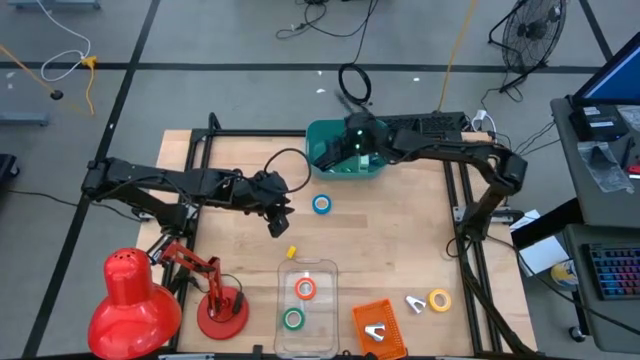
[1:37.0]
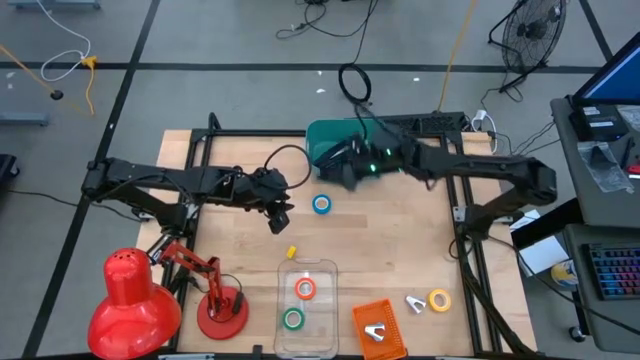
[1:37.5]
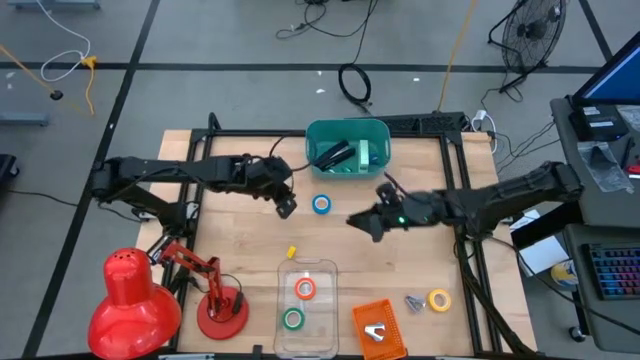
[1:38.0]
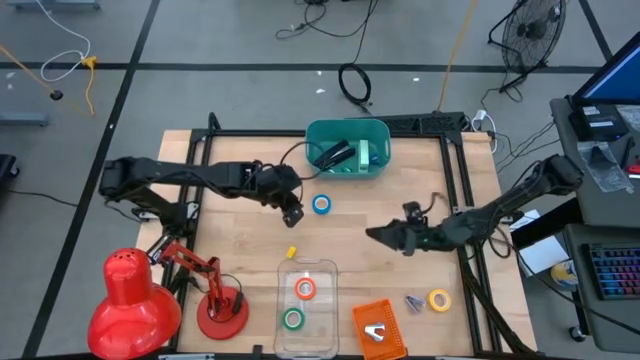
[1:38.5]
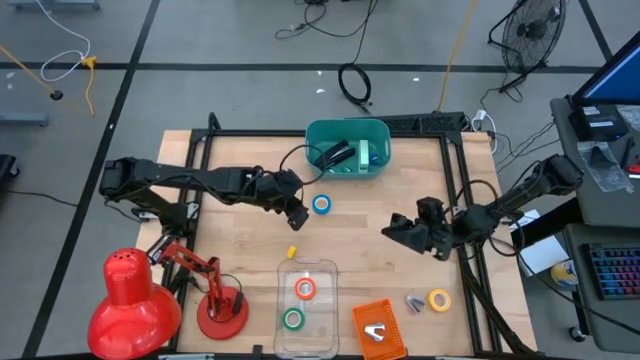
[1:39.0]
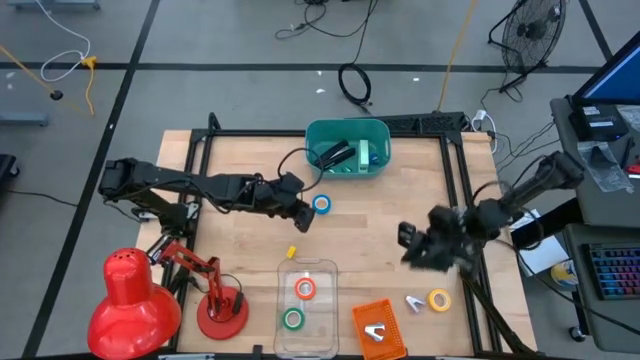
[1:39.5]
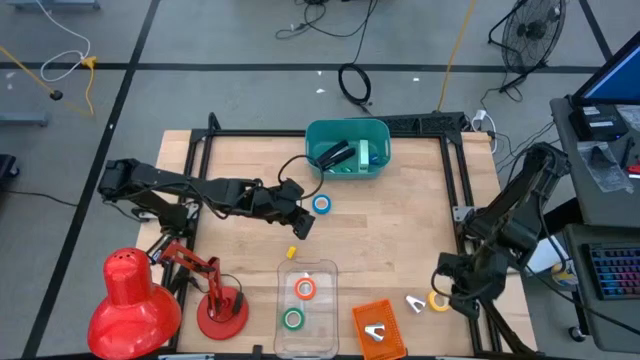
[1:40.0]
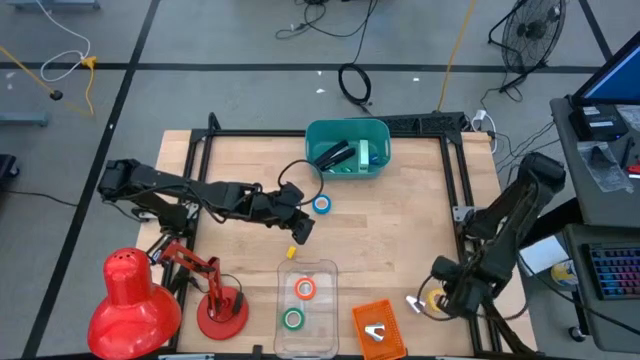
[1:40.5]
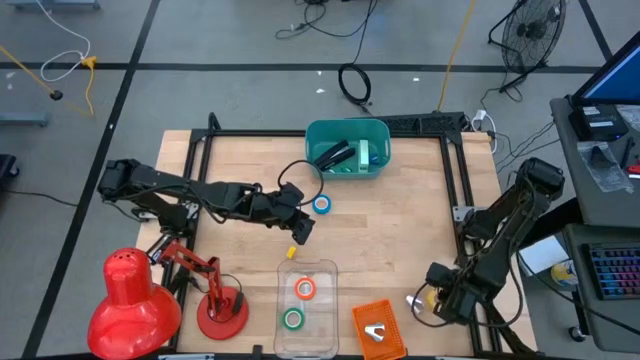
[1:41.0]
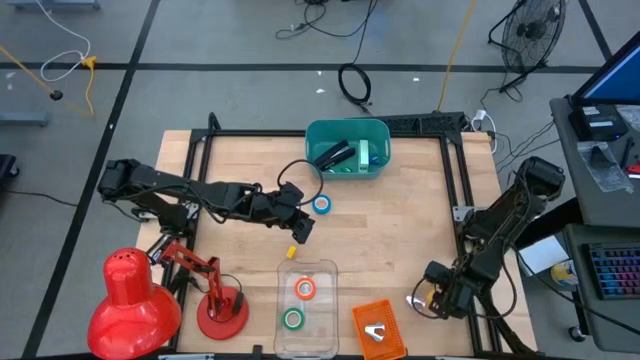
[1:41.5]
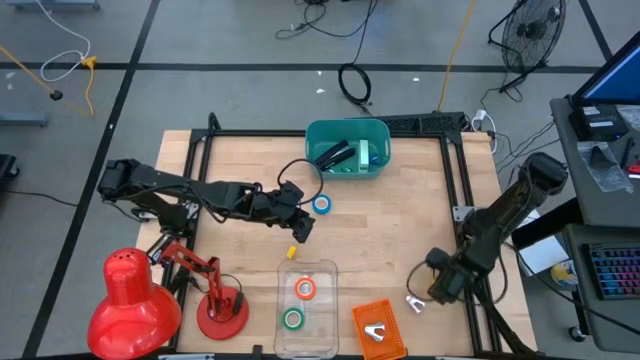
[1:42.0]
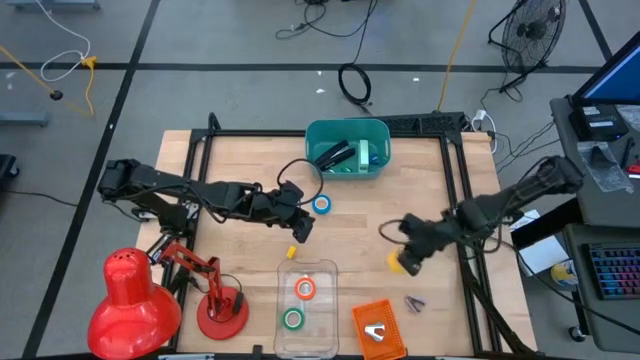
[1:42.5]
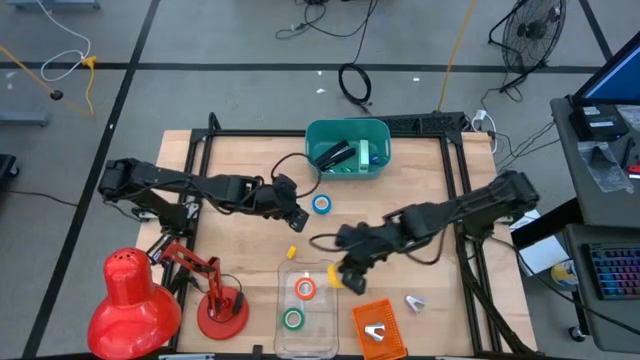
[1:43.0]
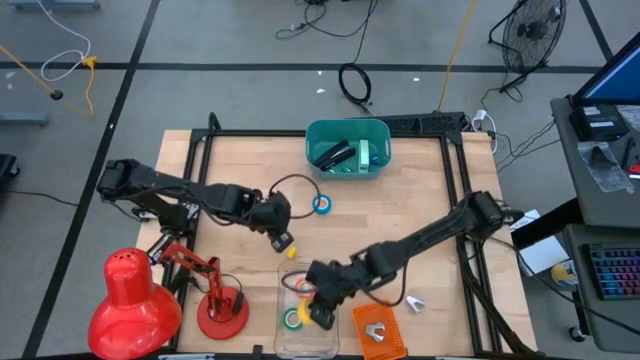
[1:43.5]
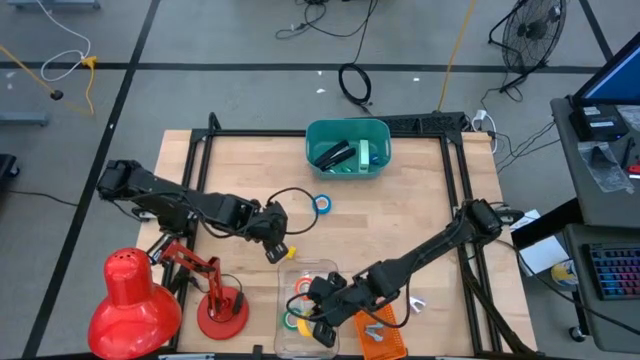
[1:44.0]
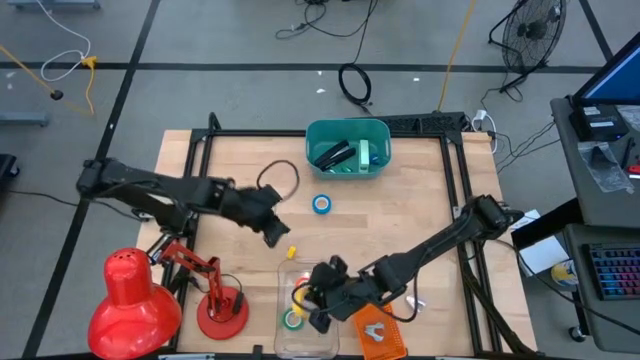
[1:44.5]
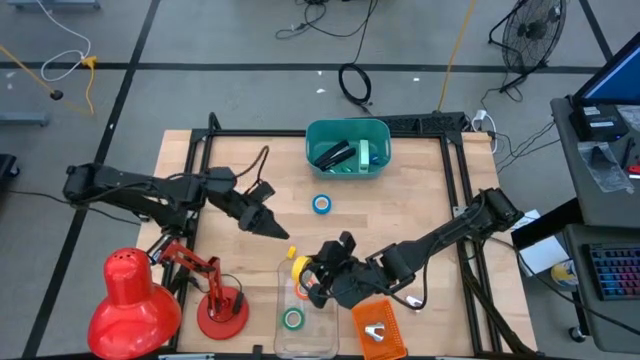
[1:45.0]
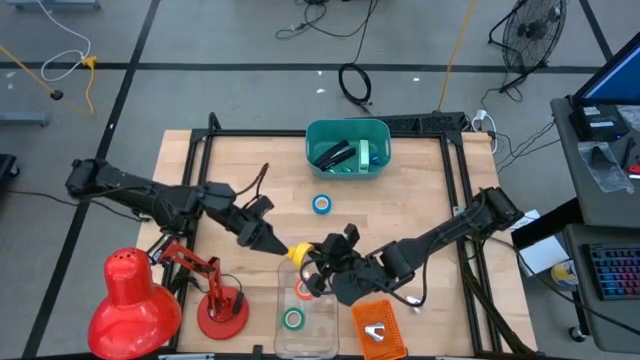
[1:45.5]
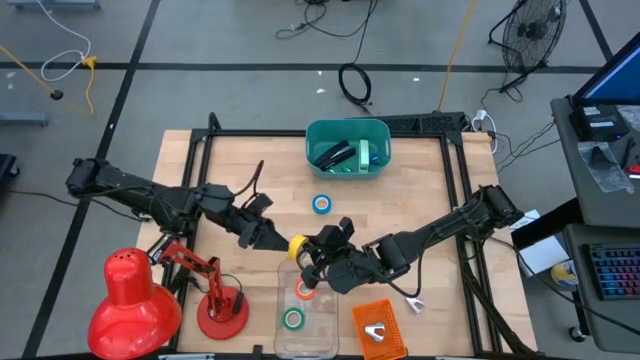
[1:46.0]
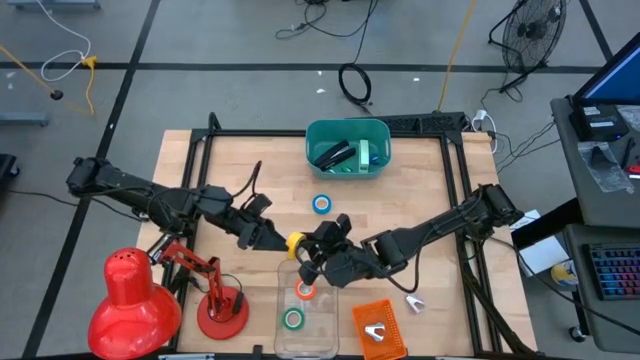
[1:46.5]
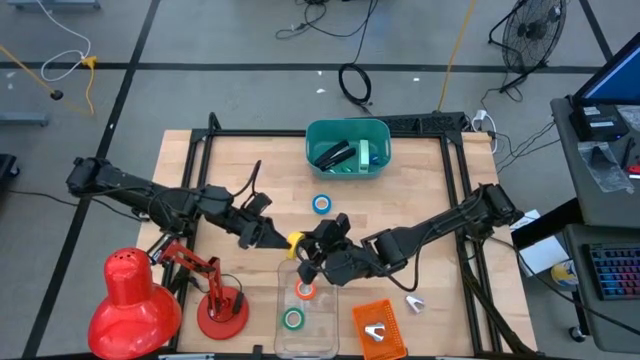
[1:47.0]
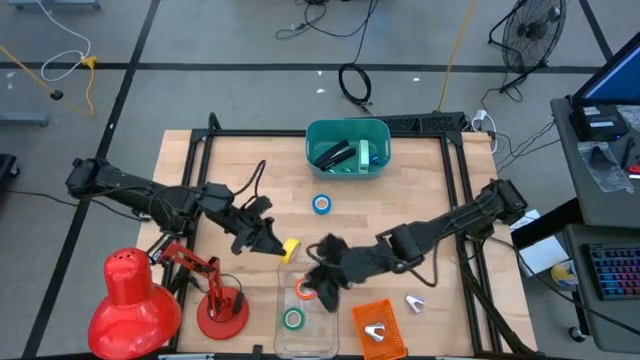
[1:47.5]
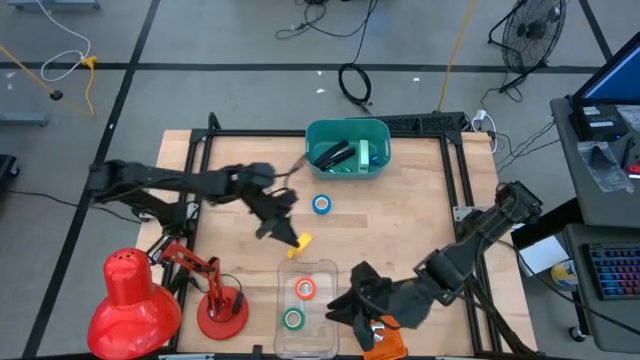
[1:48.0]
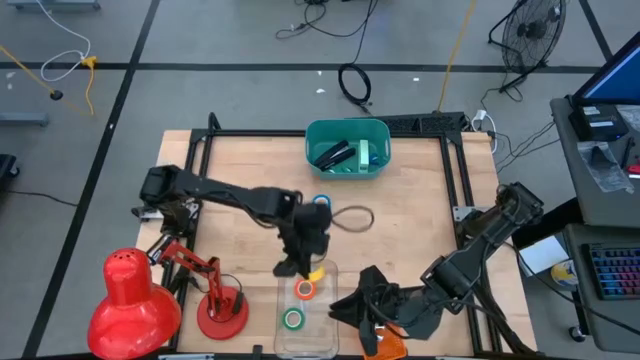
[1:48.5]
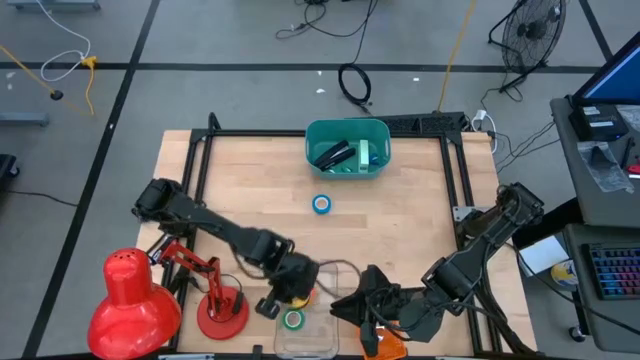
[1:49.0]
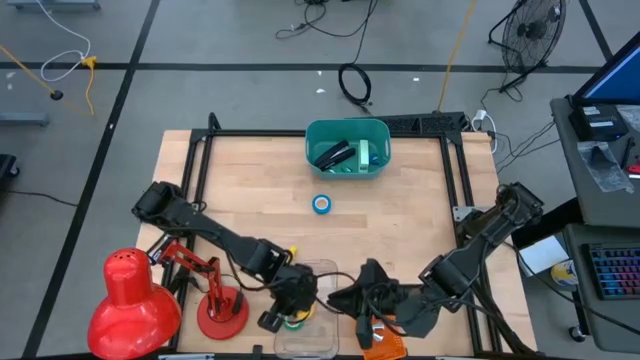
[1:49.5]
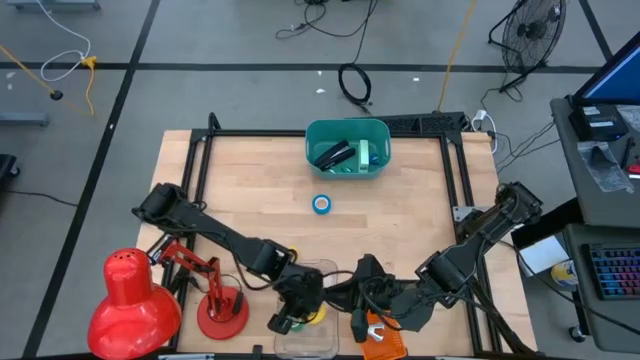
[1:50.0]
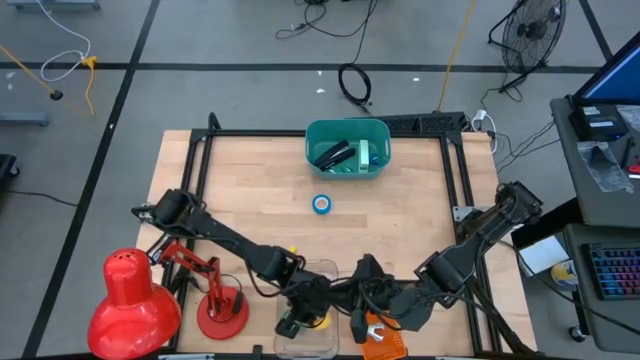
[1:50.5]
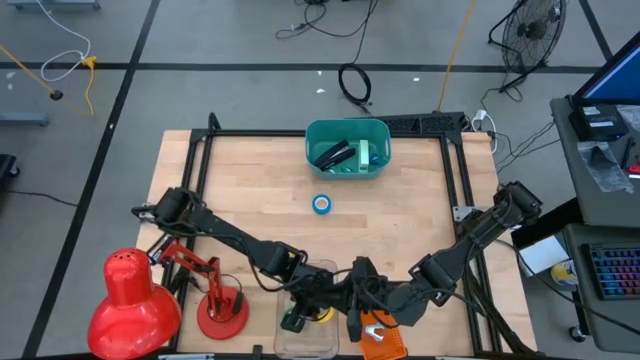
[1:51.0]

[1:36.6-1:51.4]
Task: Pick and place Stapler, Stapler remover, tape
Put the yellow tape into the transparent bin

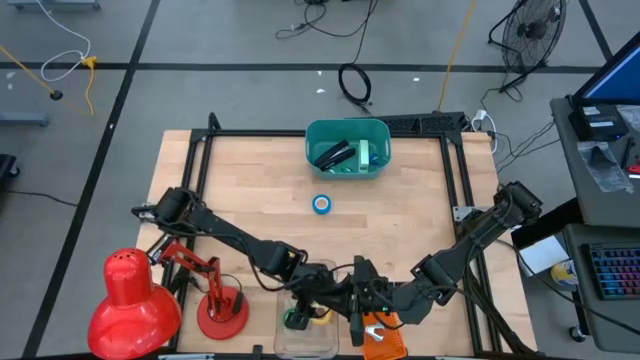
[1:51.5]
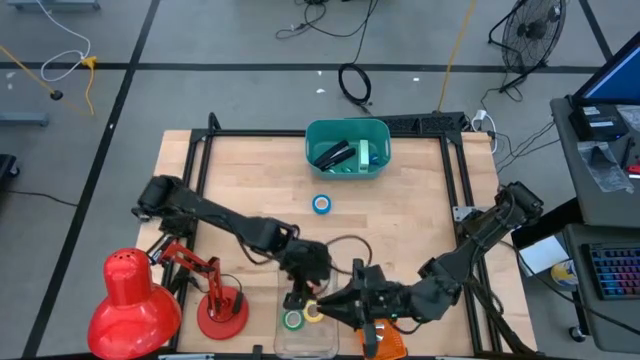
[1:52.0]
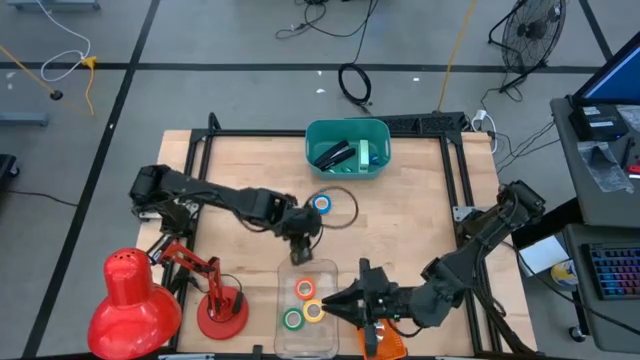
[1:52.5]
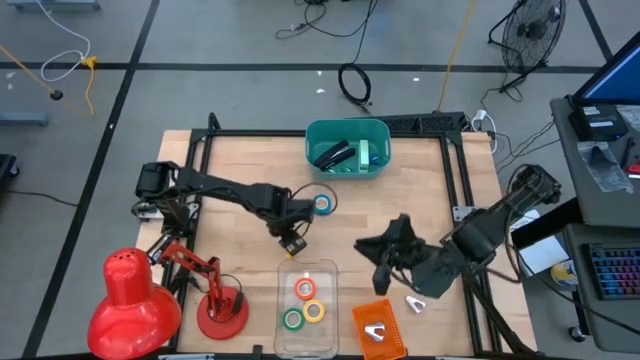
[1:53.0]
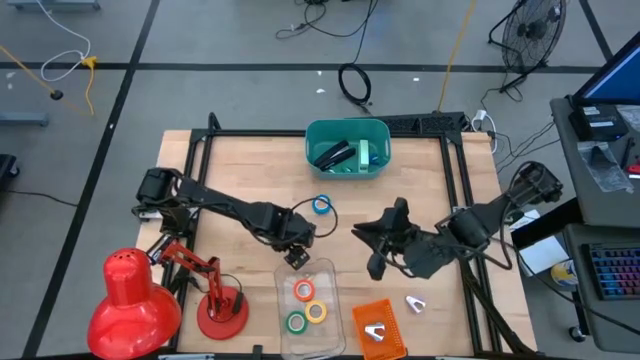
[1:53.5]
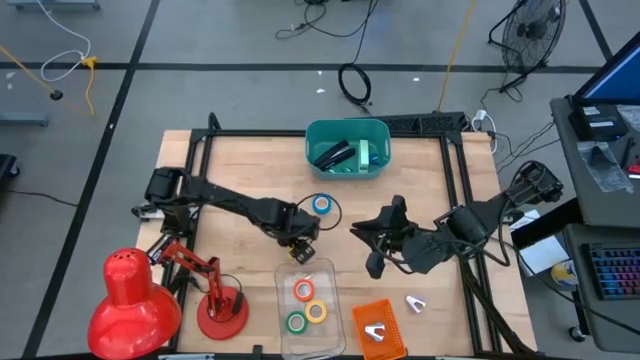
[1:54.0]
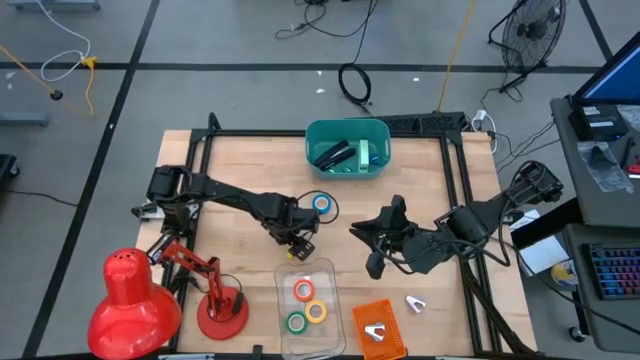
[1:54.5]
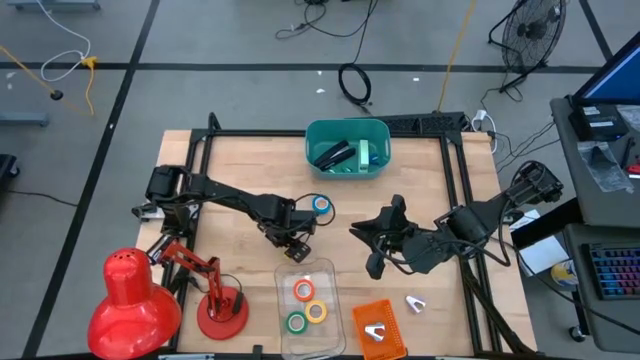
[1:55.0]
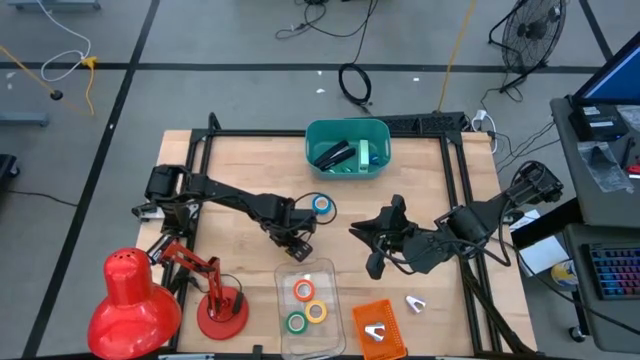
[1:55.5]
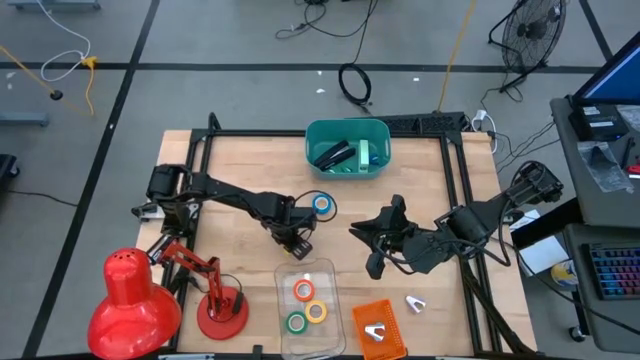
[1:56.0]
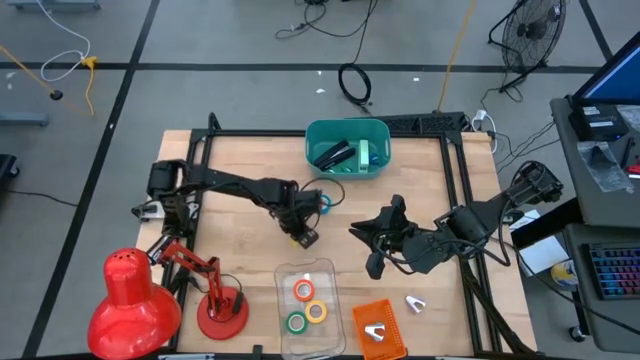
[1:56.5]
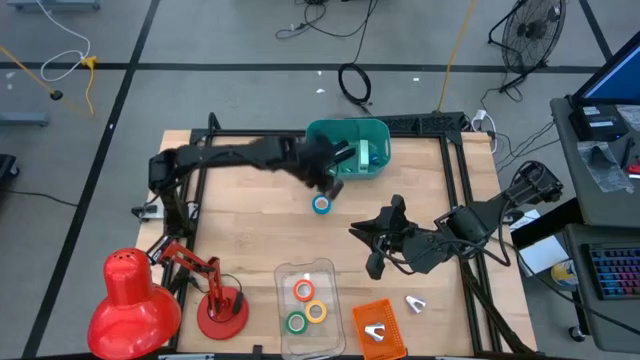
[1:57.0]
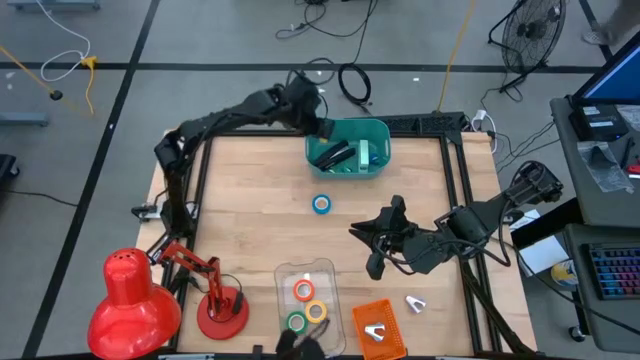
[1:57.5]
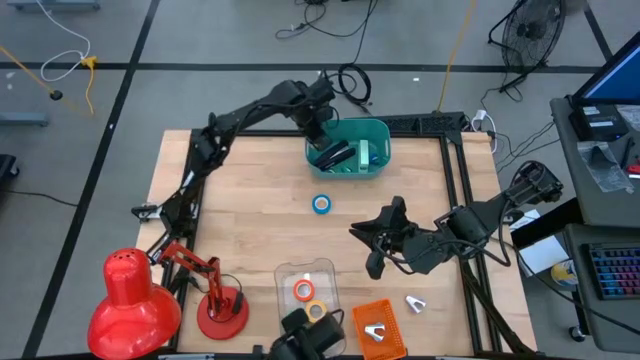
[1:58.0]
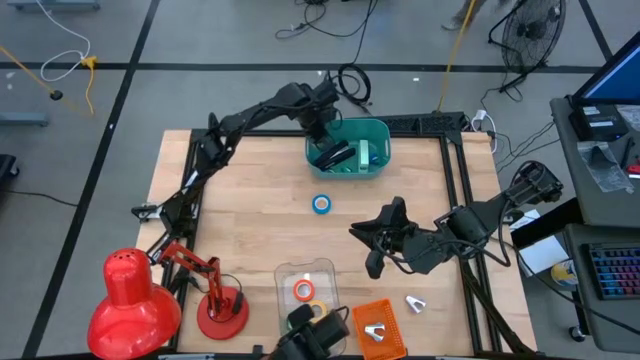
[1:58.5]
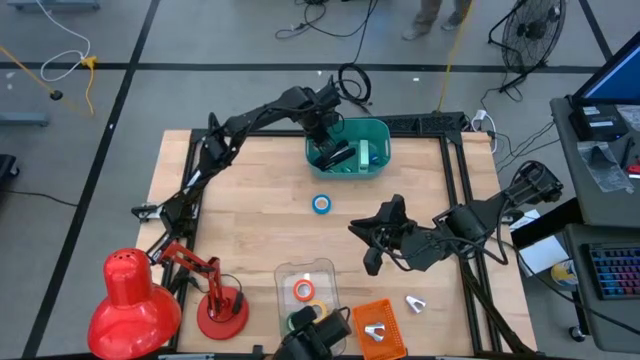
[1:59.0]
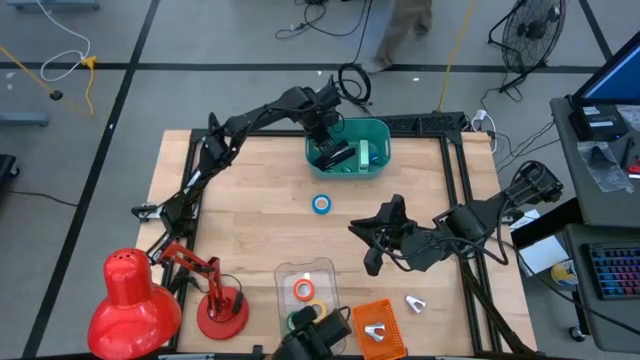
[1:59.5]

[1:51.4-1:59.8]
Put the yellow small stapler into the green bin
